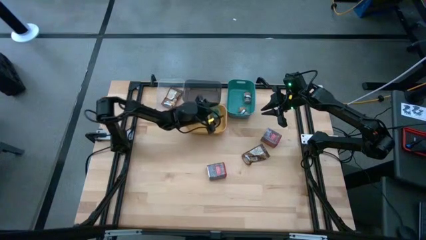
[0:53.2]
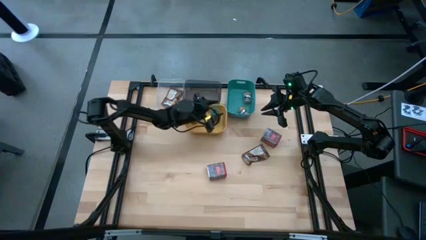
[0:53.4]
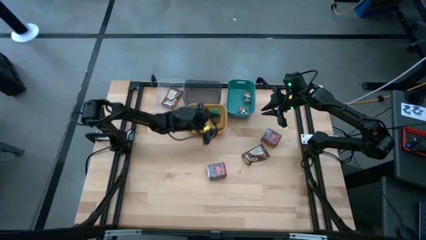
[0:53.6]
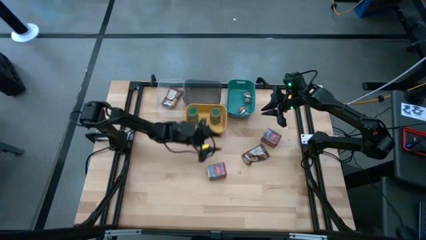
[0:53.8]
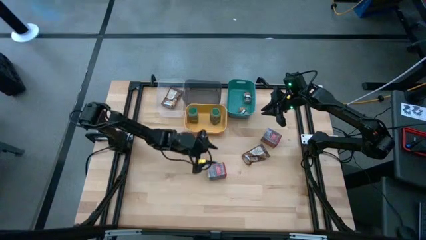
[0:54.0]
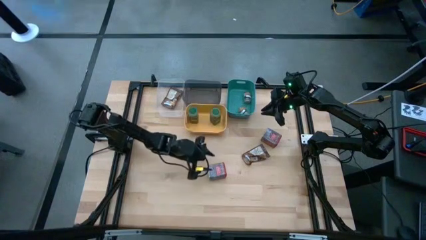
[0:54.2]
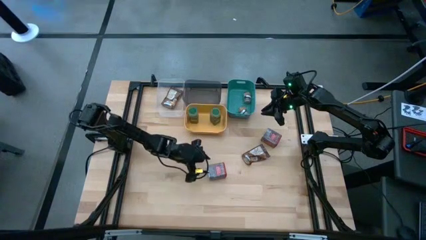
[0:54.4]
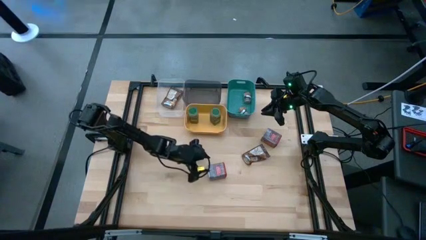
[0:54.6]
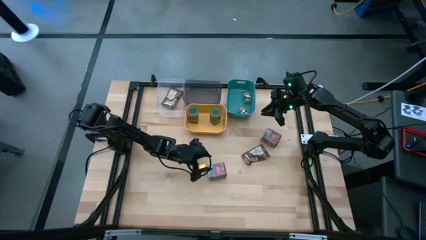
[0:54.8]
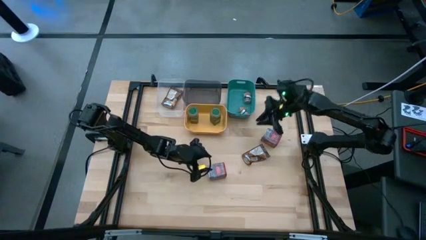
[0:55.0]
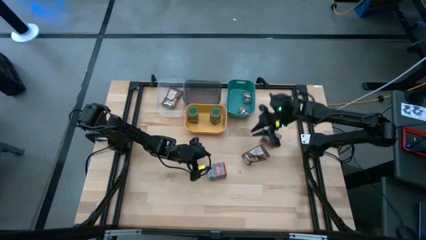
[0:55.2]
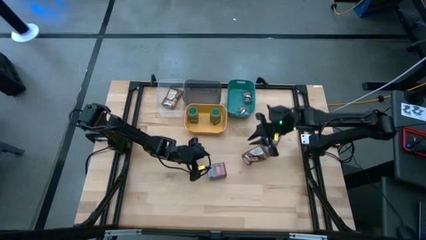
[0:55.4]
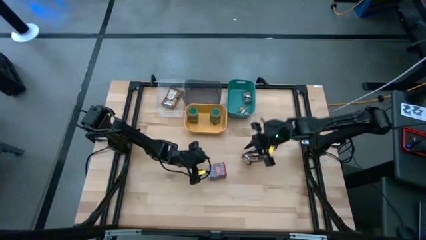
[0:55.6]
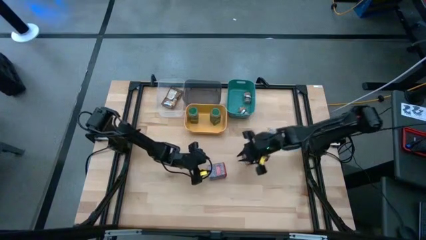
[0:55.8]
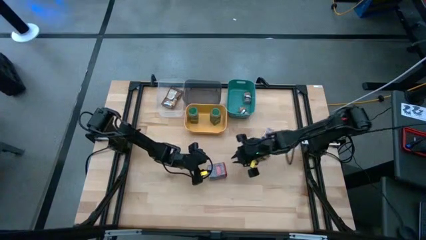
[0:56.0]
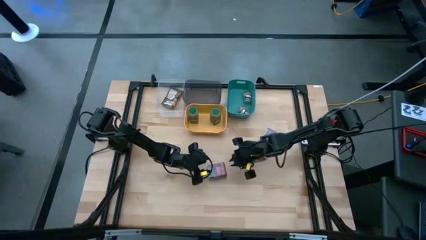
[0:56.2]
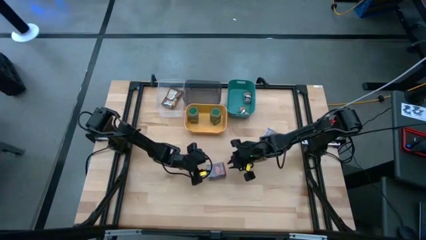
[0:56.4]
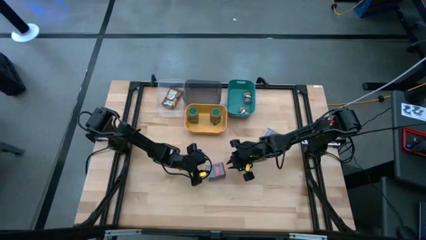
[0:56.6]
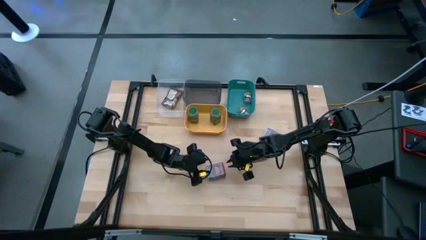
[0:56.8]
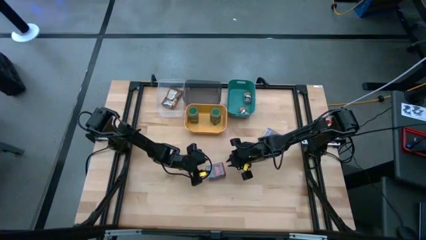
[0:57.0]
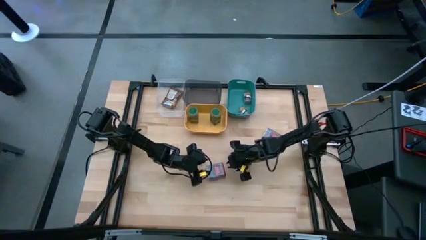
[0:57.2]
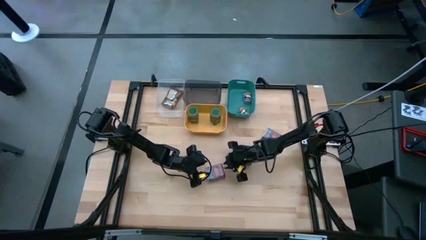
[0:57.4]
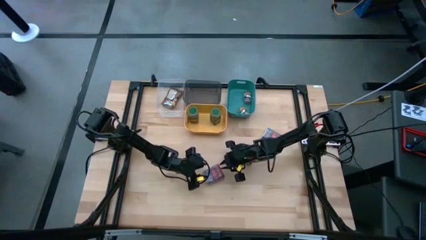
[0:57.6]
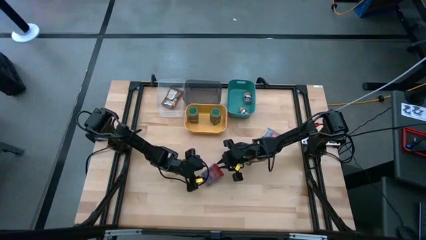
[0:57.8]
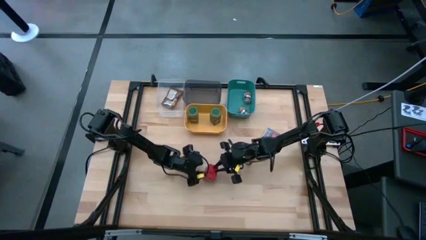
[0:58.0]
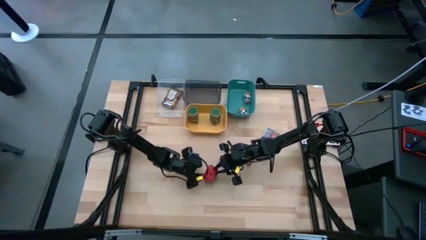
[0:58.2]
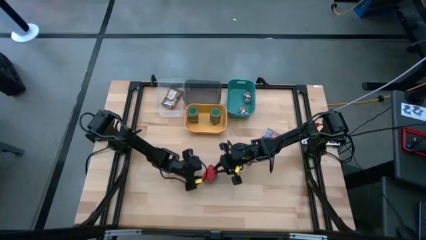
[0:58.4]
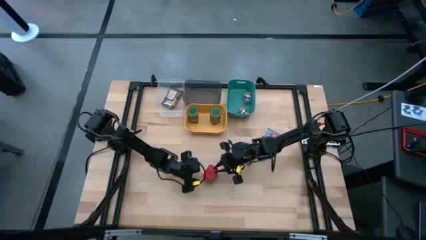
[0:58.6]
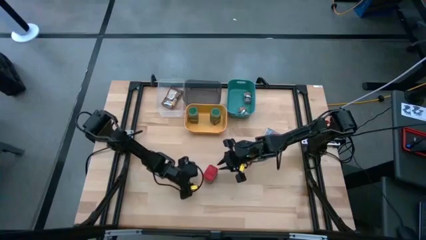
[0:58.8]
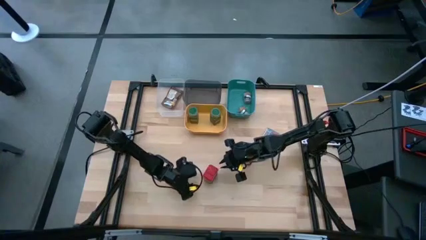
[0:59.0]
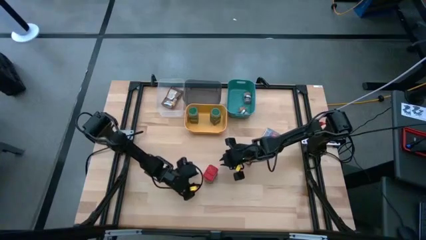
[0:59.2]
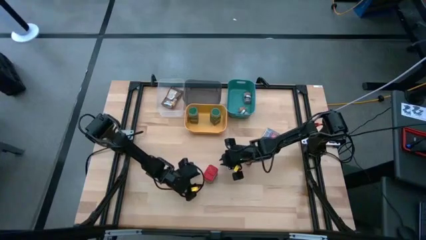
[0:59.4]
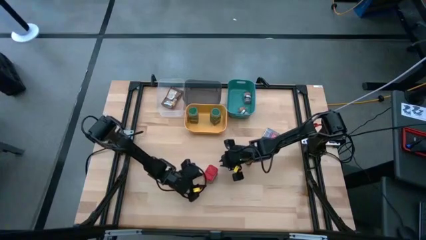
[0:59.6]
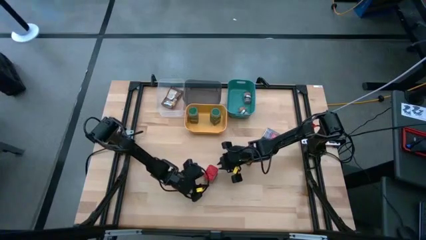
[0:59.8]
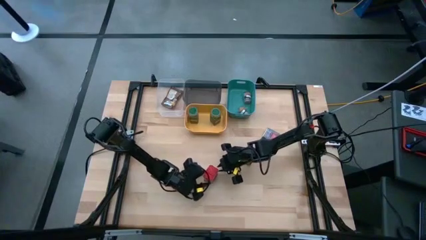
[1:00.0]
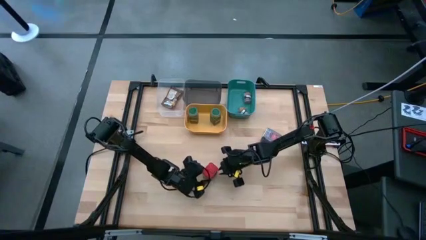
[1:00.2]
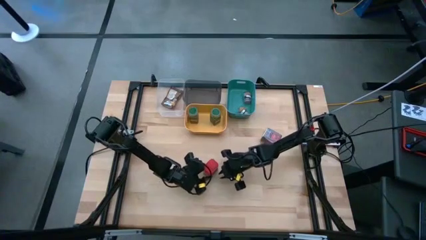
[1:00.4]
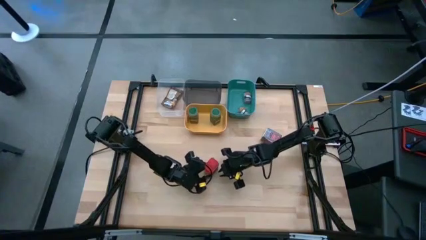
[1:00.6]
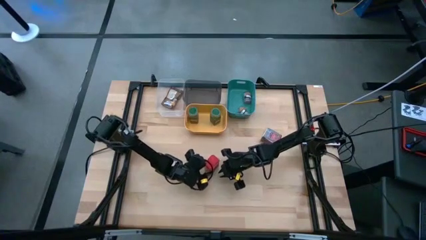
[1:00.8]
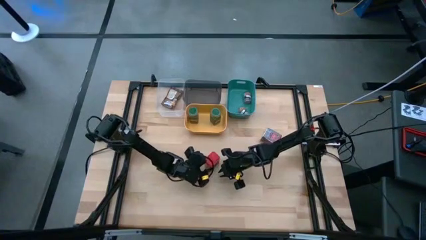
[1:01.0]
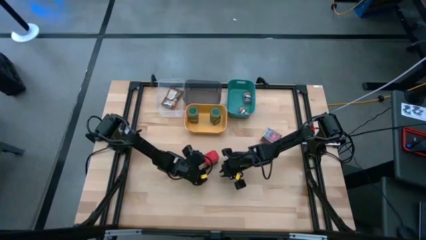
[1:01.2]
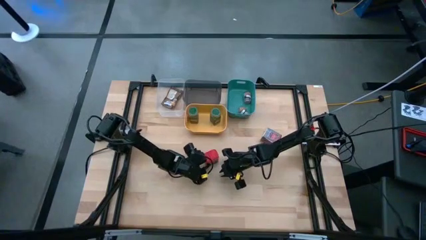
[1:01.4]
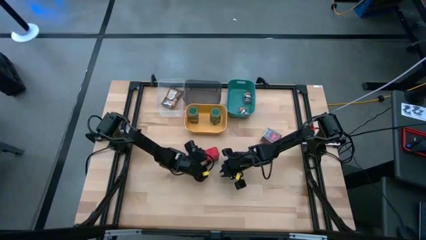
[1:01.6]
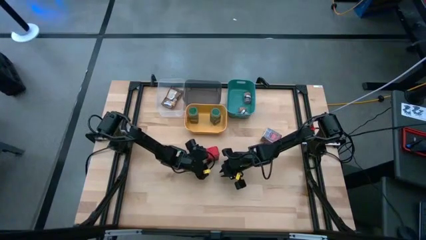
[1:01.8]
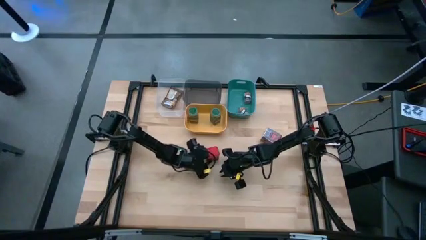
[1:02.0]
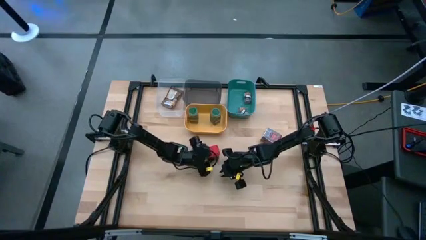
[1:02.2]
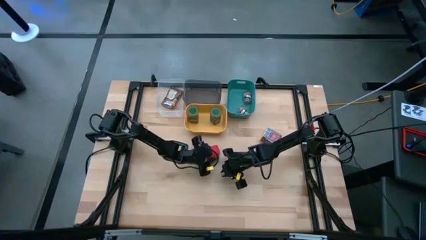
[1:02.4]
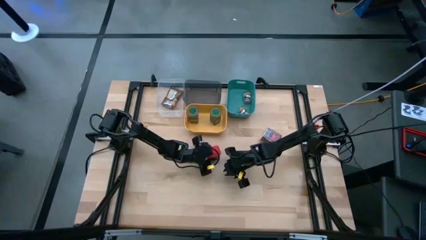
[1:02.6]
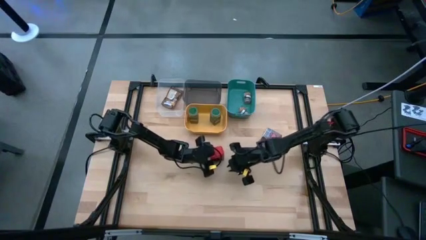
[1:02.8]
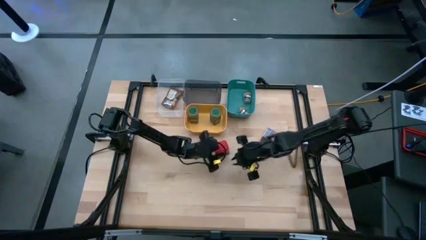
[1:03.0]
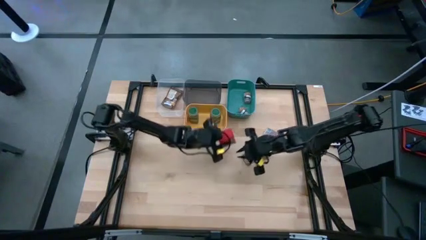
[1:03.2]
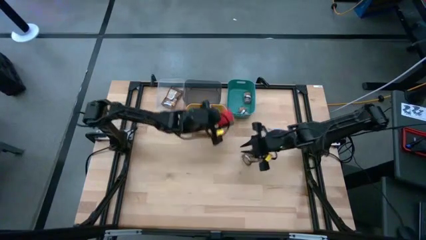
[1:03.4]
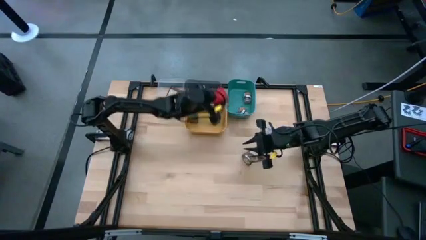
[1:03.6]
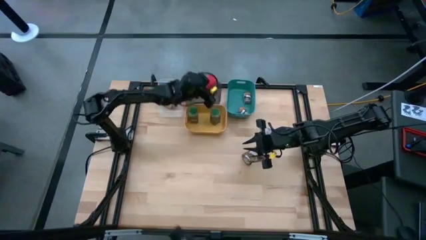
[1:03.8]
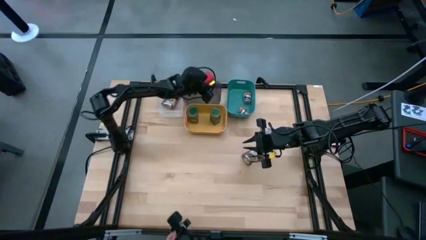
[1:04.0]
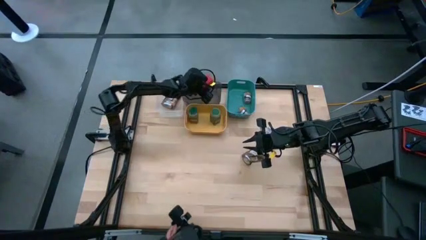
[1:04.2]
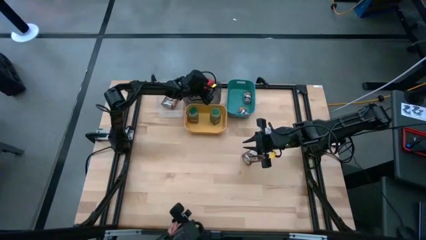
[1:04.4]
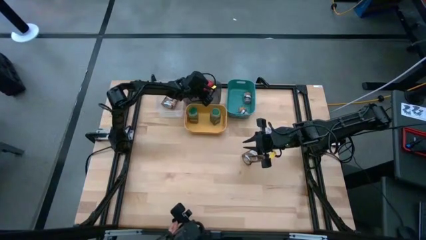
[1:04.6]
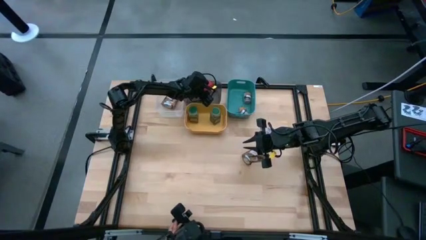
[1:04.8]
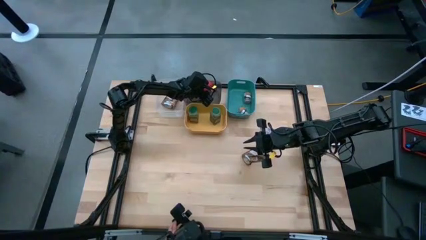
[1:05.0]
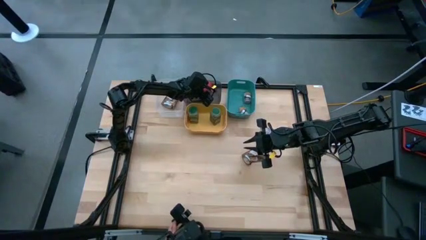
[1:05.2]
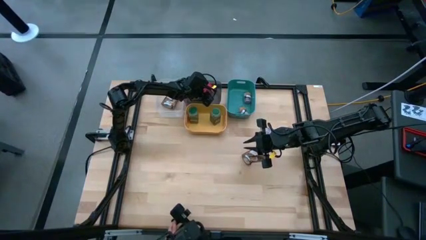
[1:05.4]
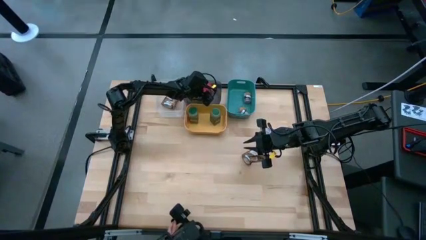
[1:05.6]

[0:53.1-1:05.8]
Task: Sort spices by type
Put the bottom red seasoning can into the black transparent bin

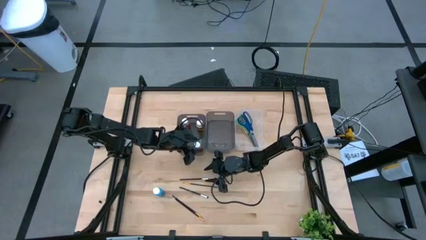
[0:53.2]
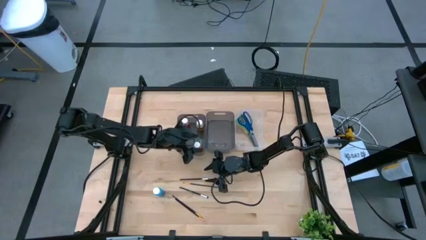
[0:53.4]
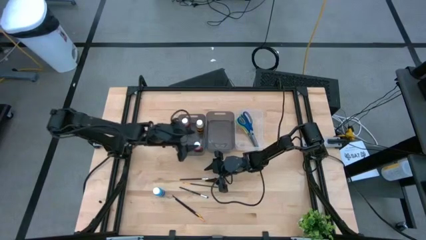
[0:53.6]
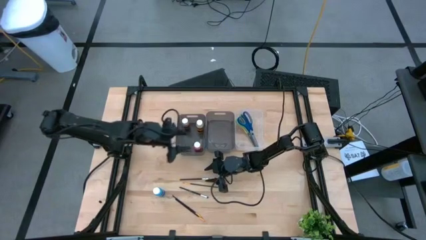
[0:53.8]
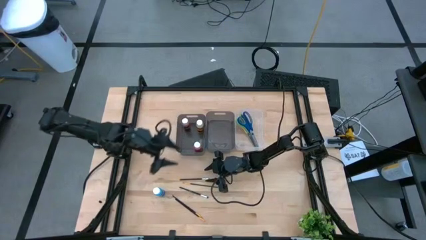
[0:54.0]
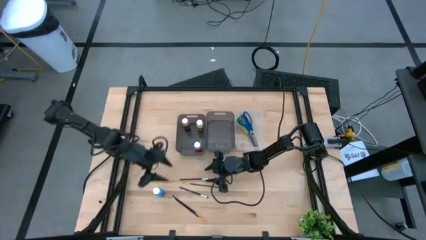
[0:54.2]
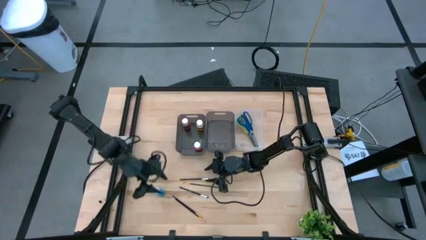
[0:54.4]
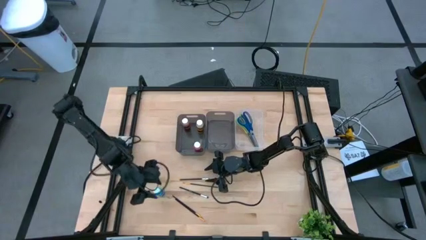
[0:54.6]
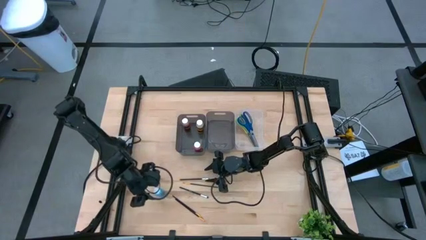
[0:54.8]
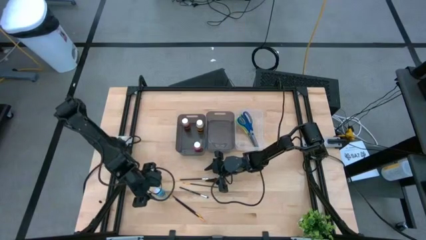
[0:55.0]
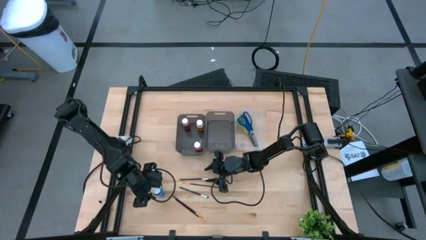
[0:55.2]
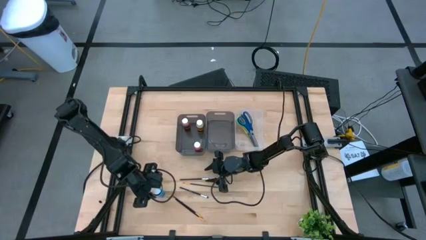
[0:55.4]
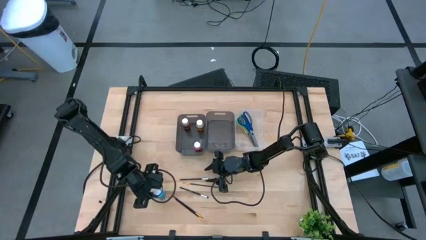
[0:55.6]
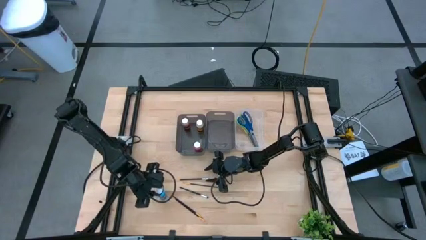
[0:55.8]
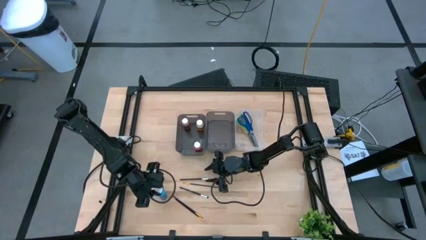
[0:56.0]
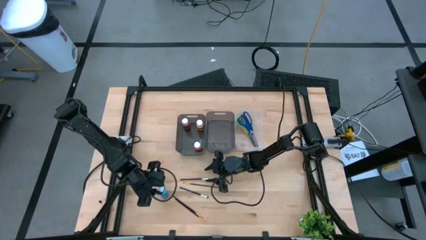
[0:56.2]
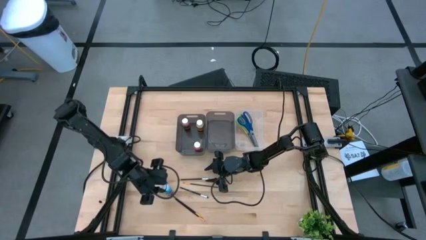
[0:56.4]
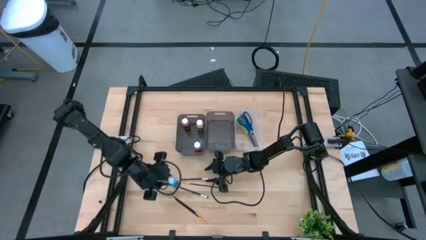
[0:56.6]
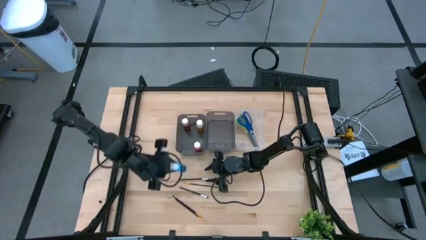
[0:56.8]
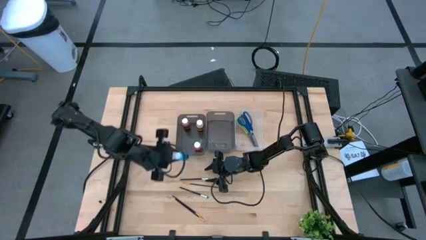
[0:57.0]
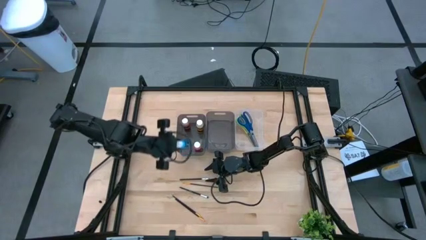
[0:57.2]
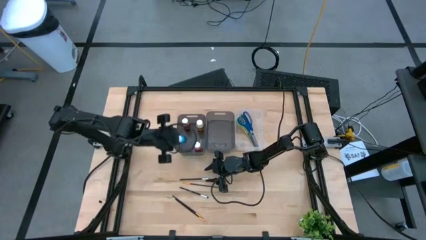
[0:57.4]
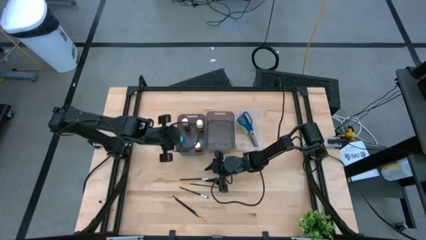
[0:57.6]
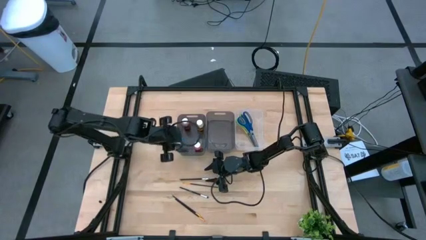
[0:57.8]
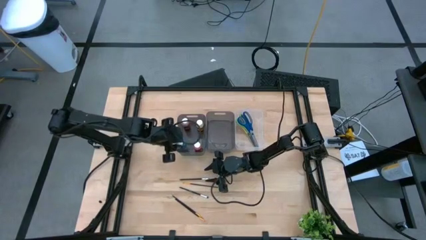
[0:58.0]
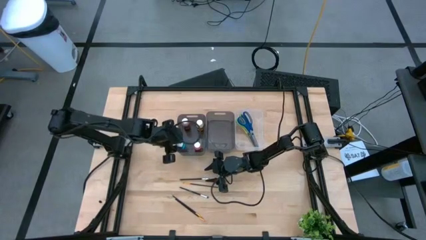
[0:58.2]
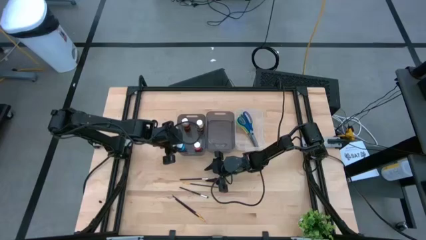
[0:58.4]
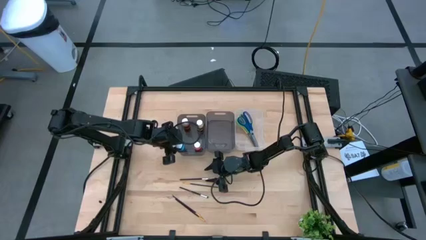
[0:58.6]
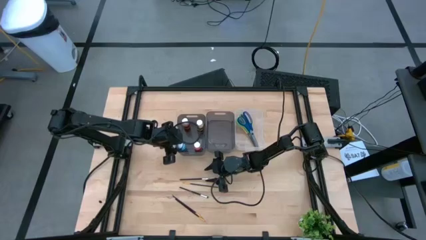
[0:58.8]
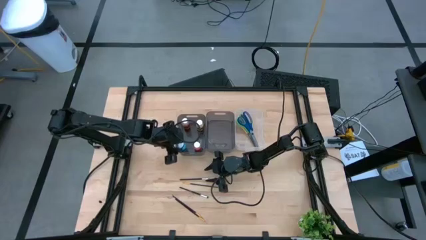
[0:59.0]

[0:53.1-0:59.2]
Task: Pick & Place Paint Supplies
Put the blue paint bottle into the left black bin
